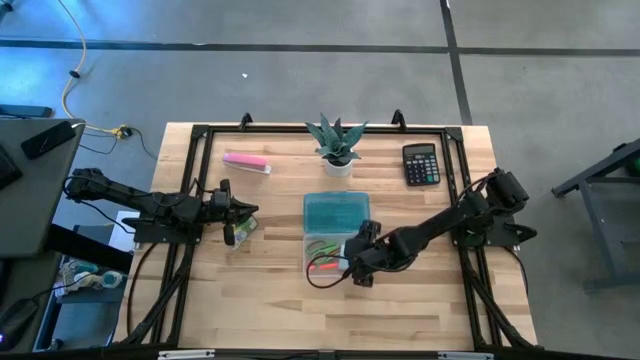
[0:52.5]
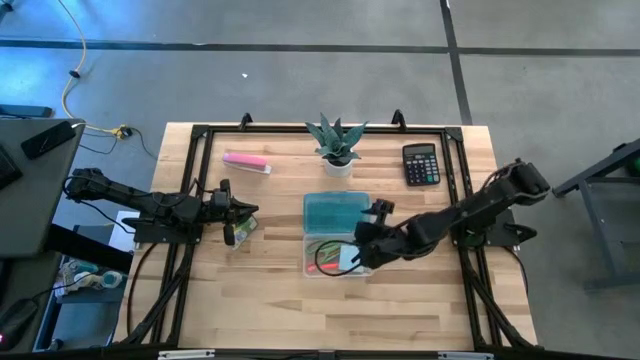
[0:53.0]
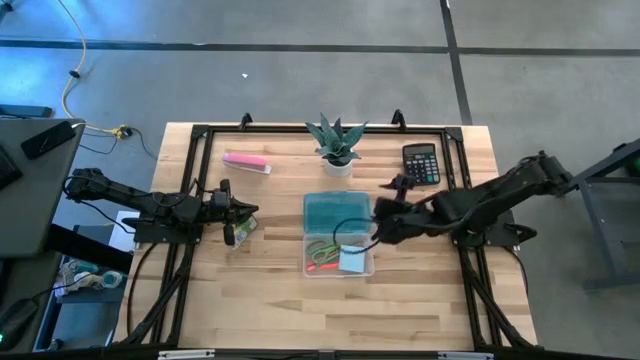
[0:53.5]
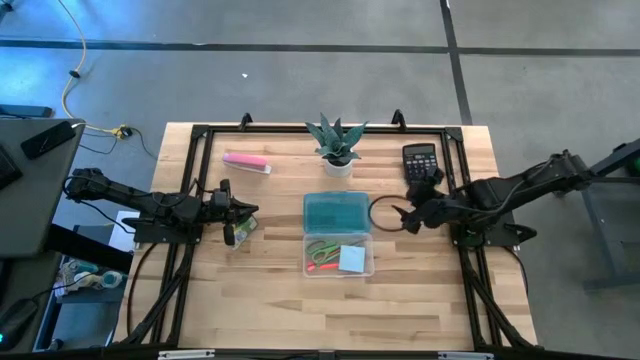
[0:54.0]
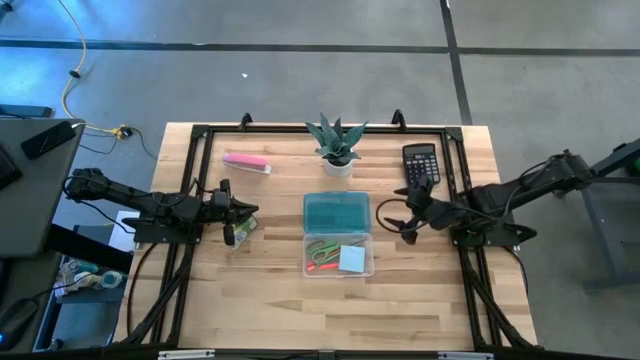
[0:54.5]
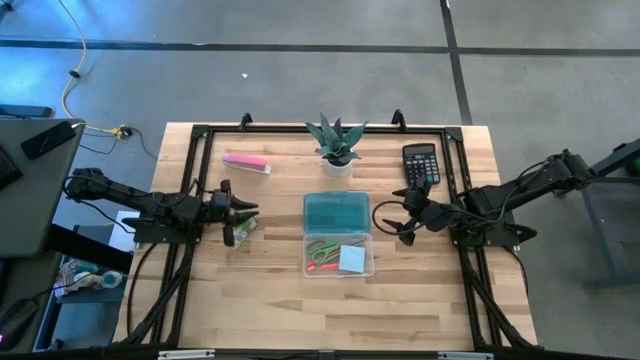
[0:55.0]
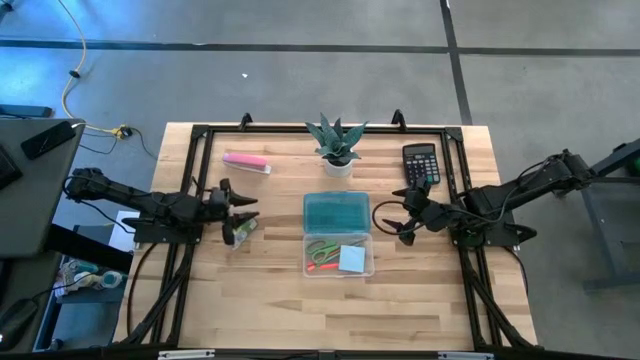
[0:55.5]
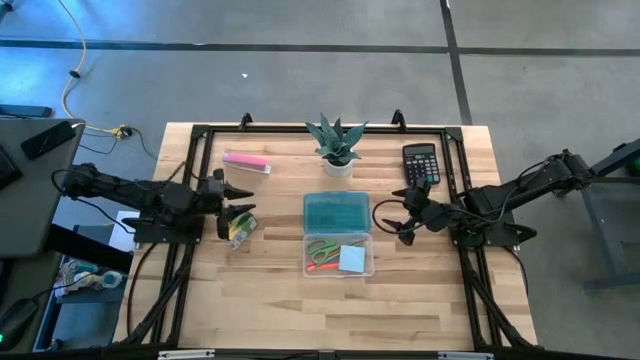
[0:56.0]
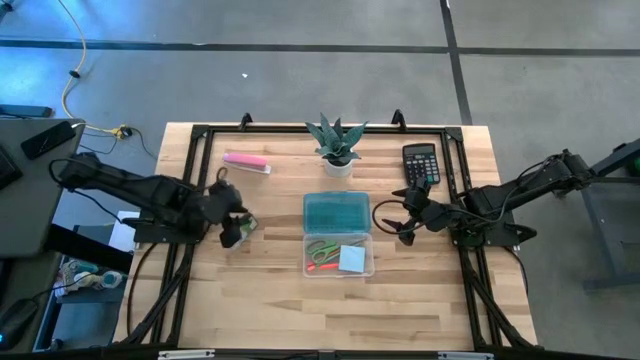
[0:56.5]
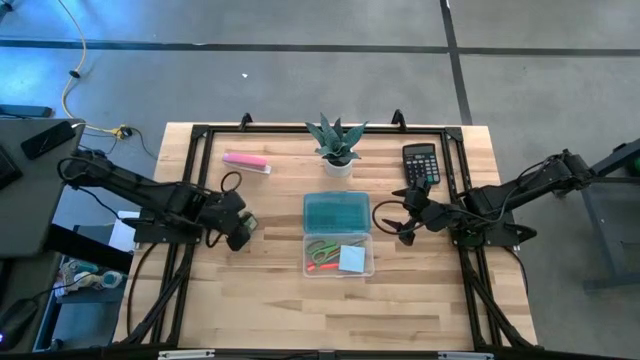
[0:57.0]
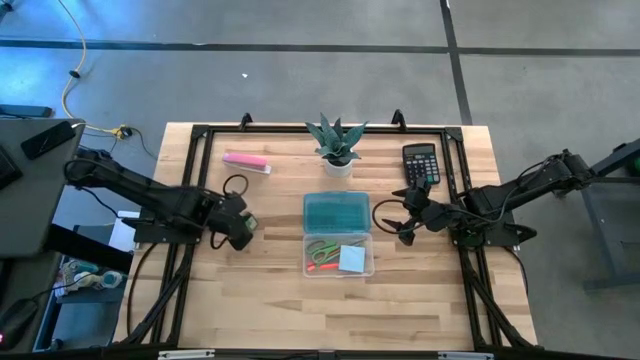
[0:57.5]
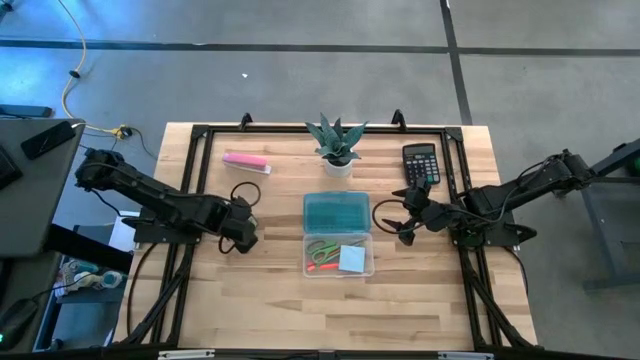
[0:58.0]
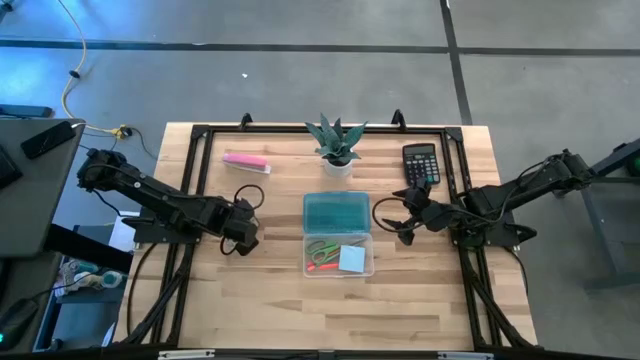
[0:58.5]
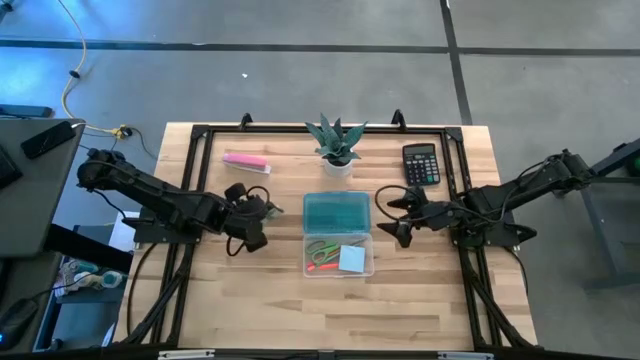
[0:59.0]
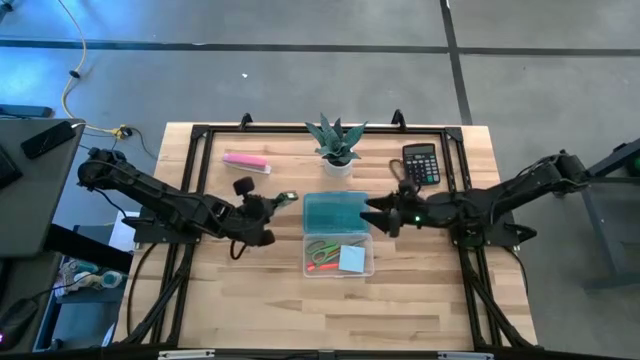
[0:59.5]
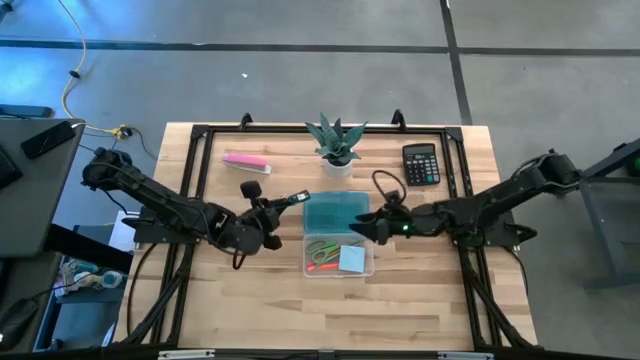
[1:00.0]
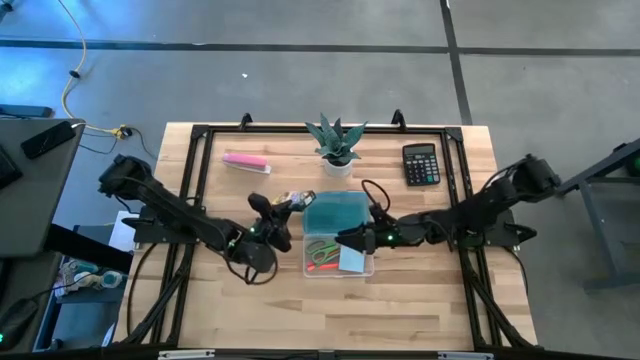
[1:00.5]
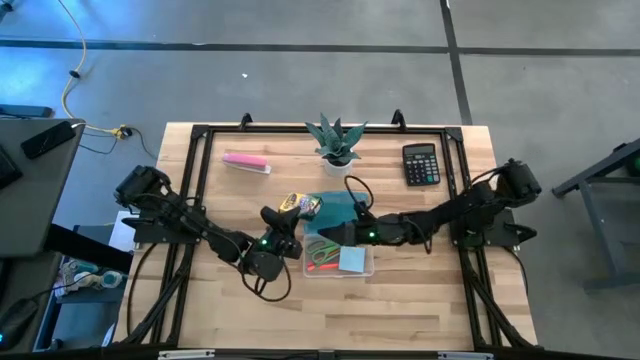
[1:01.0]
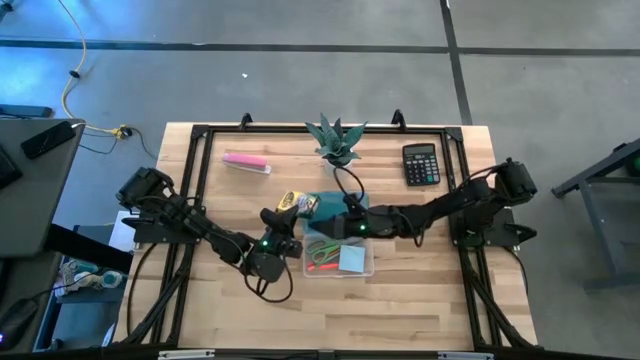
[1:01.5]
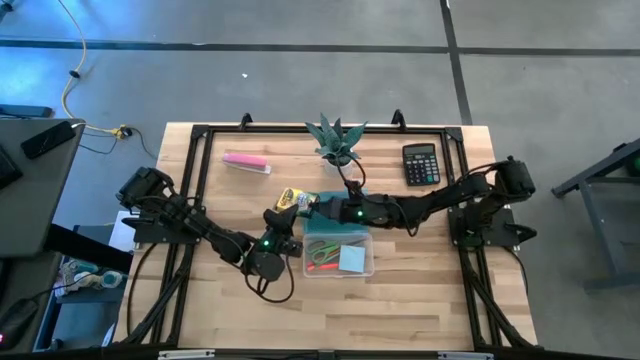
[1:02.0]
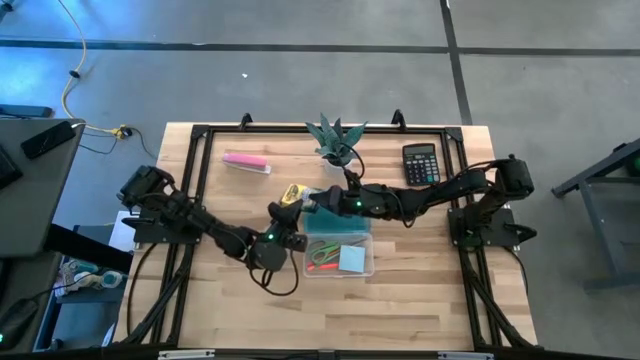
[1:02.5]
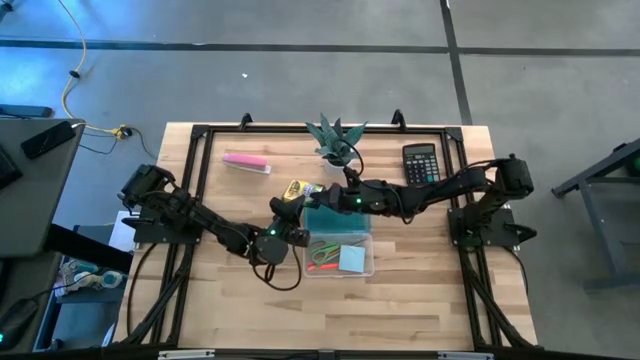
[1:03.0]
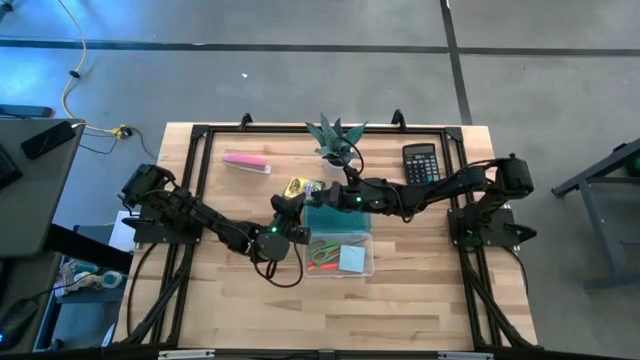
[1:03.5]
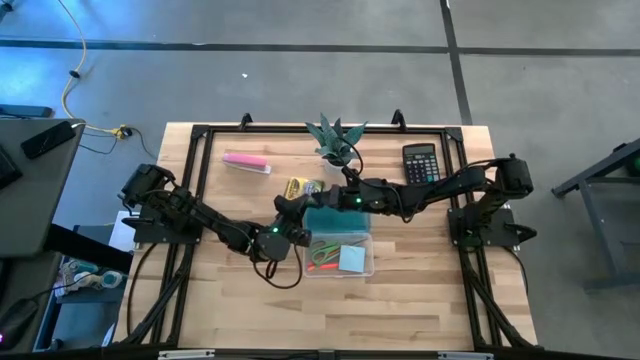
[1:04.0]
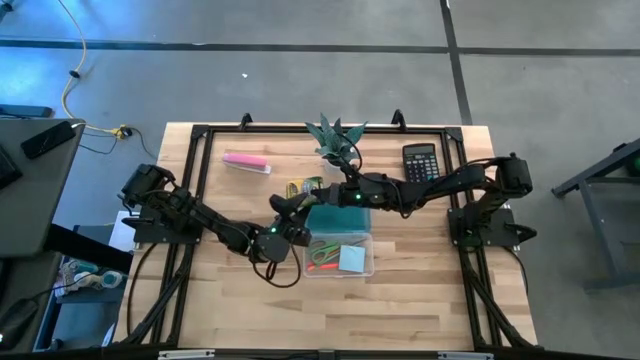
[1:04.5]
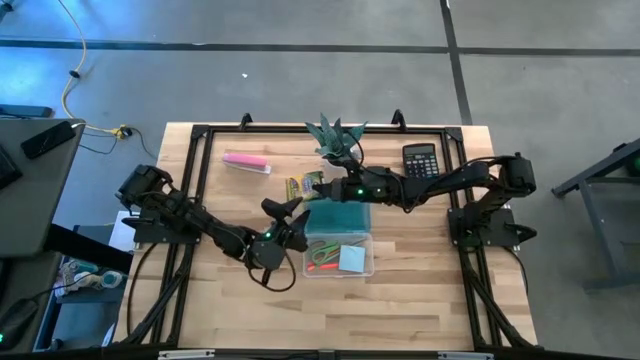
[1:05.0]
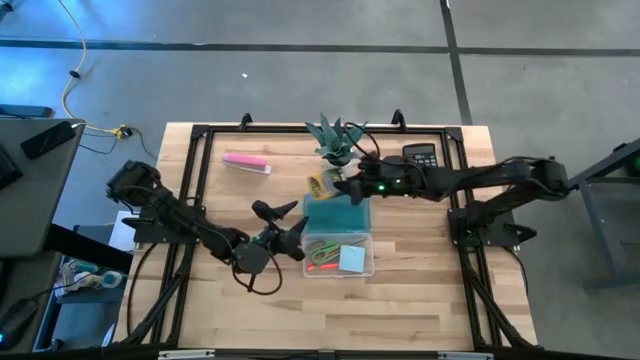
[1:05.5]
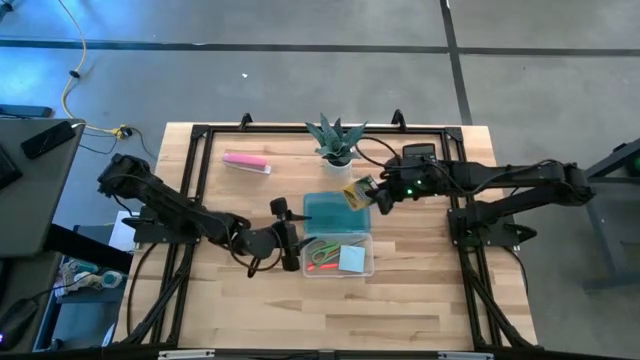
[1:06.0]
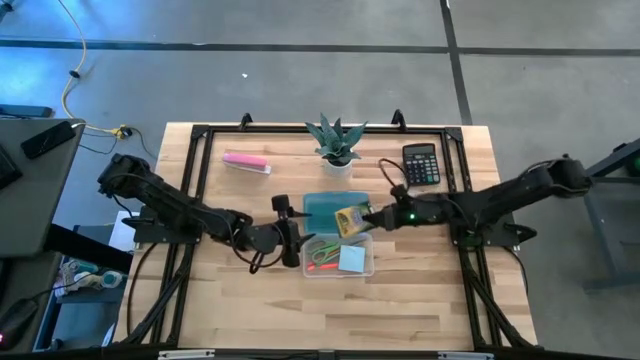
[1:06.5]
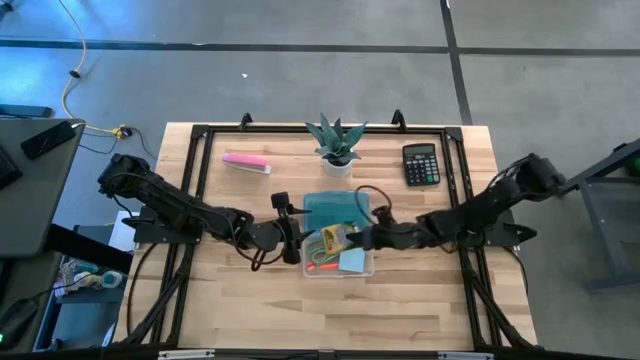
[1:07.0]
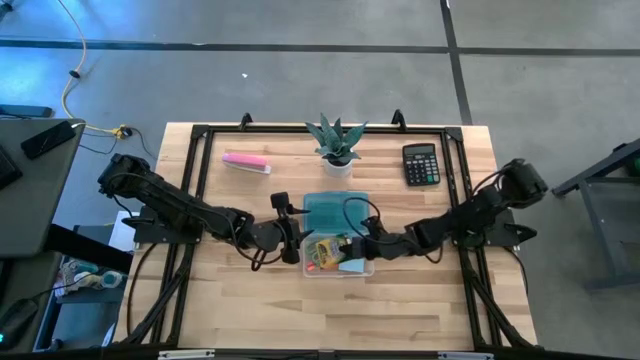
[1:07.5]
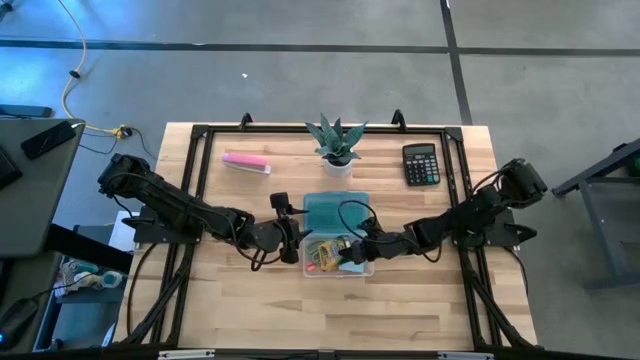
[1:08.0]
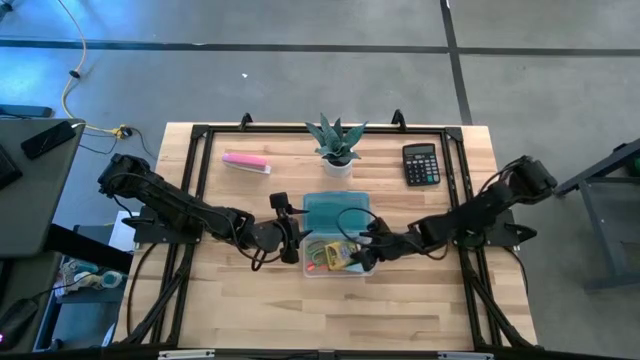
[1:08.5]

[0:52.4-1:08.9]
Task: Pack school essentials
Put the crayon box into the blue supply box

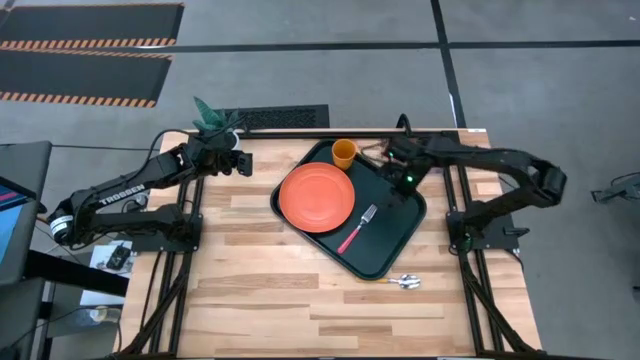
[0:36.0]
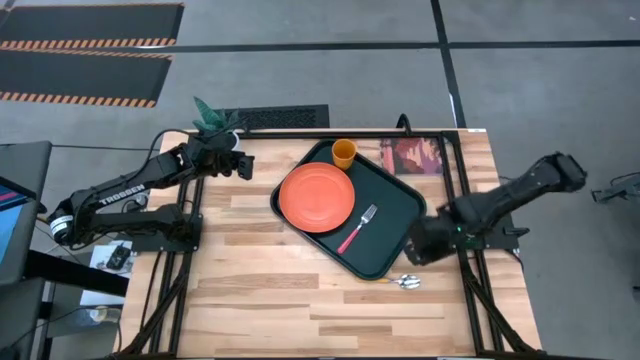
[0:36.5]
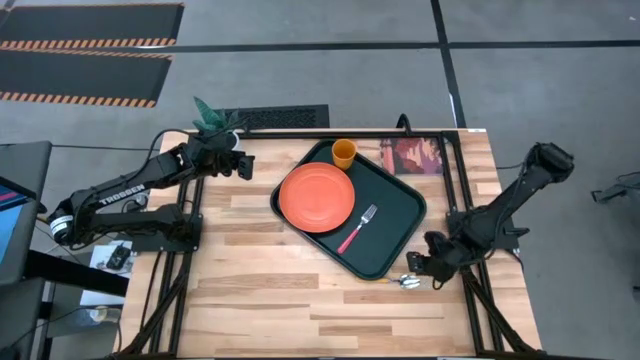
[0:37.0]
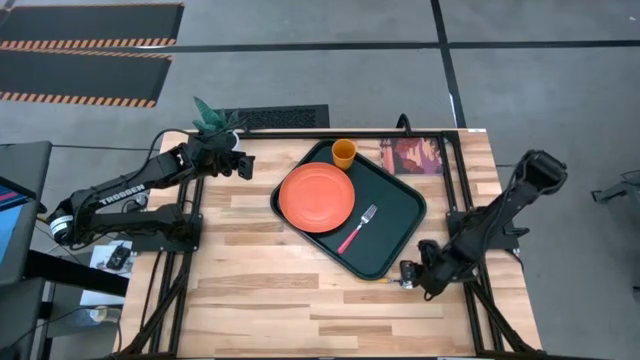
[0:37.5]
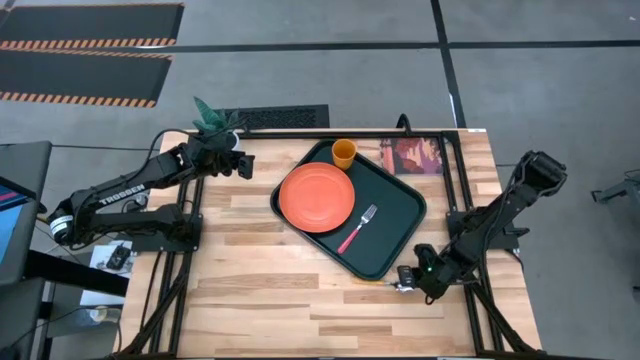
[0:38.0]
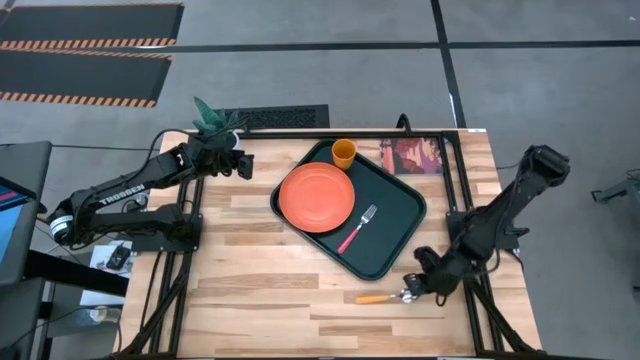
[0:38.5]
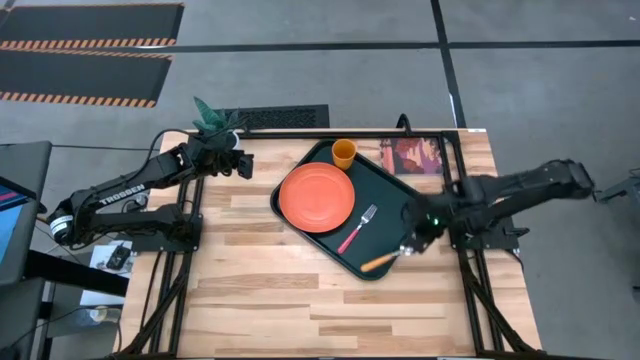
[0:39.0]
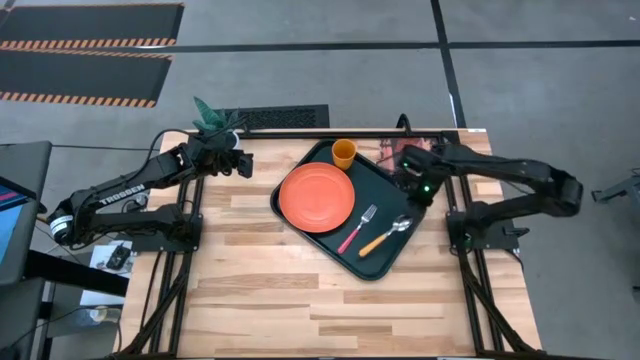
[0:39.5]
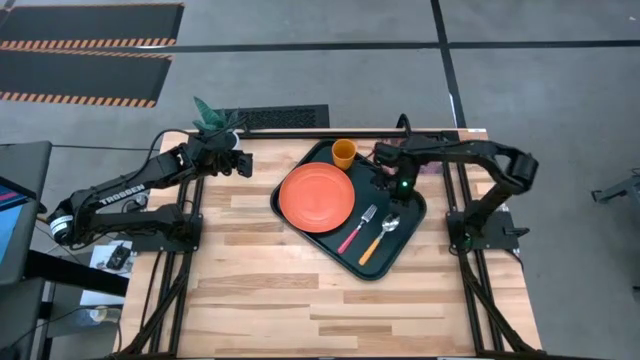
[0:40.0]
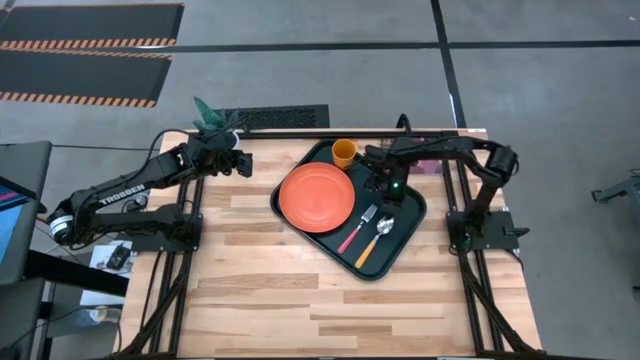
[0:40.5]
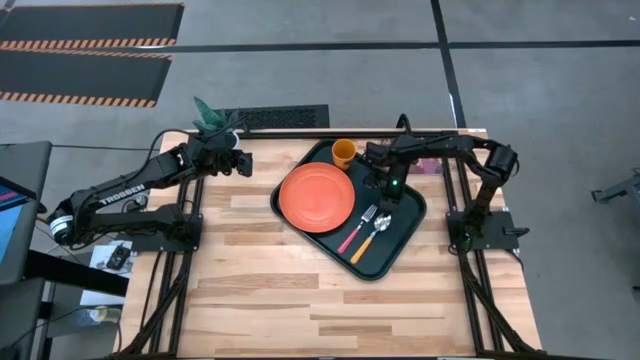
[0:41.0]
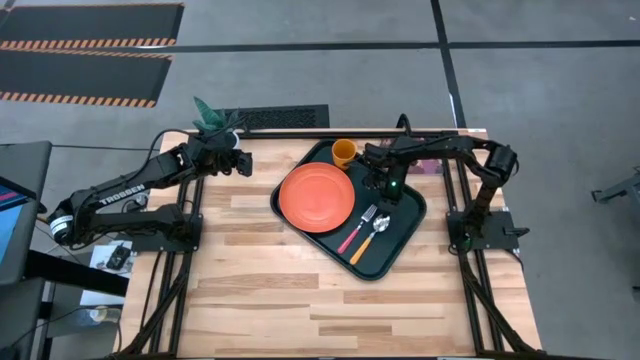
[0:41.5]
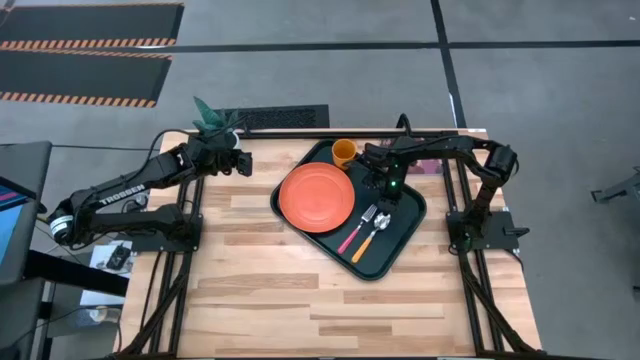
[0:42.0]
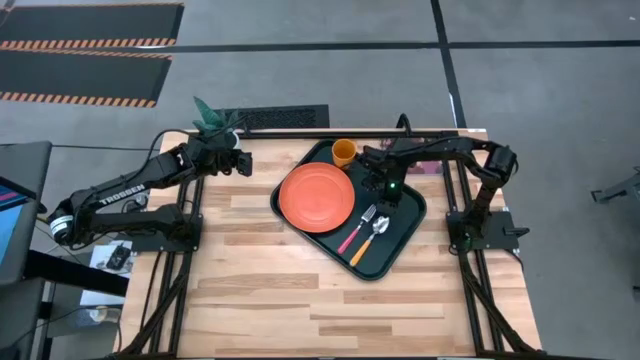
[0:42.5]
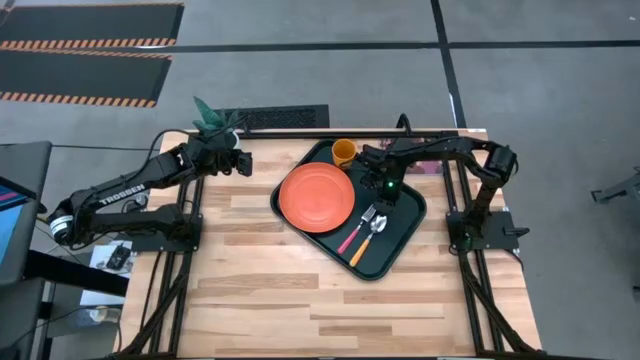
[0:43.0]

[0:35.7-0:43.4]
Task: Pick and place plate/cup/fork/spoon on tray
Put the yellow spoon on the black tray to the right side of the pink fork
